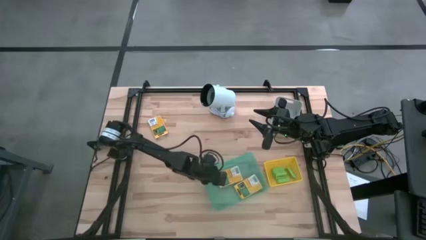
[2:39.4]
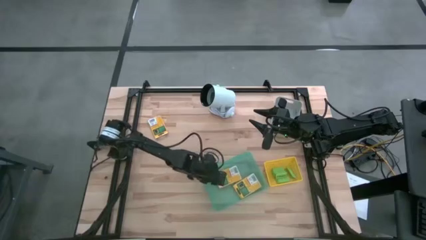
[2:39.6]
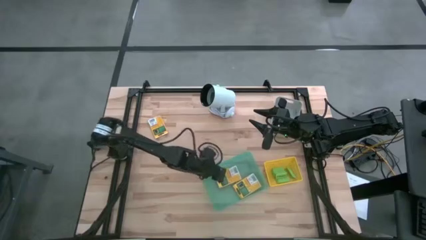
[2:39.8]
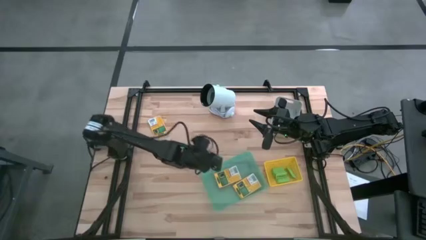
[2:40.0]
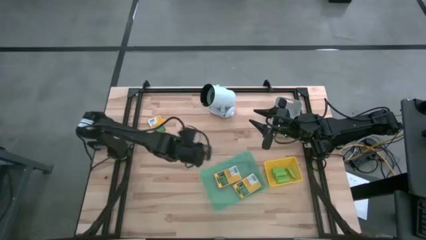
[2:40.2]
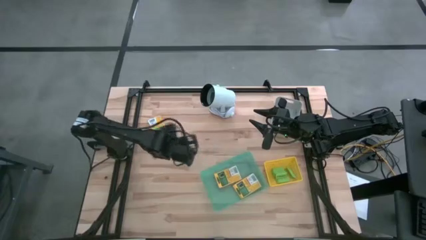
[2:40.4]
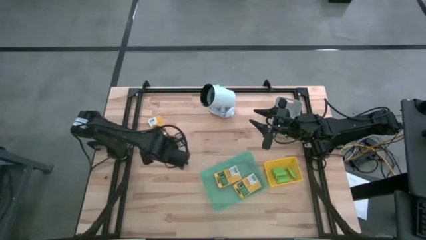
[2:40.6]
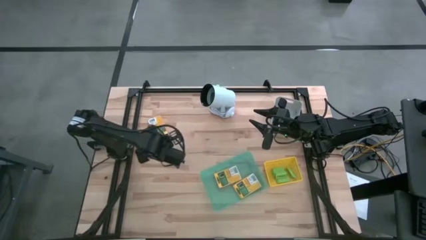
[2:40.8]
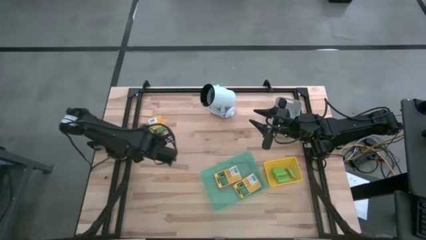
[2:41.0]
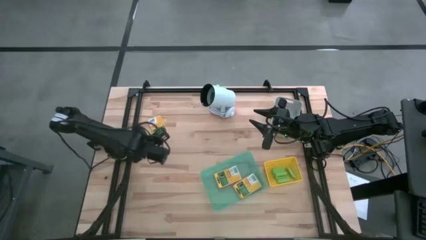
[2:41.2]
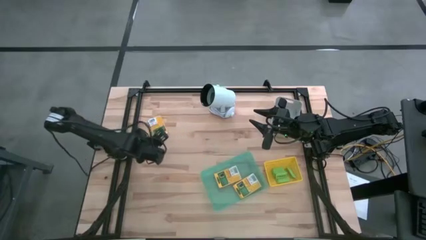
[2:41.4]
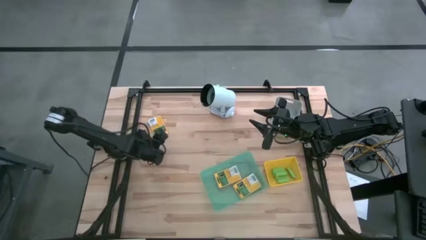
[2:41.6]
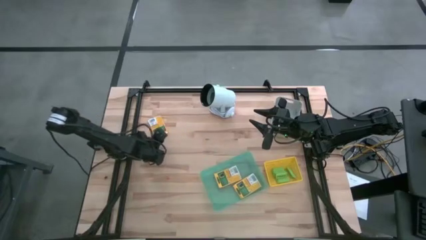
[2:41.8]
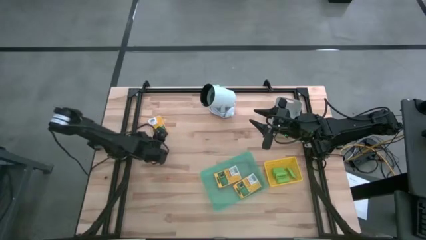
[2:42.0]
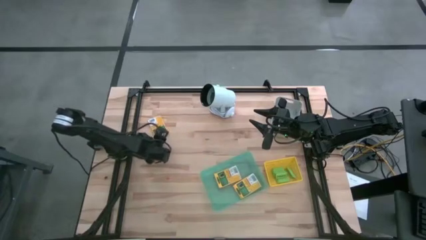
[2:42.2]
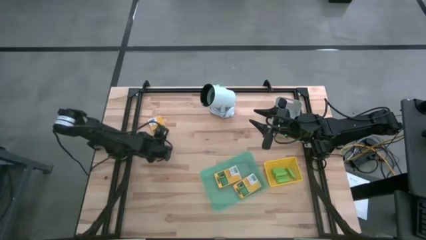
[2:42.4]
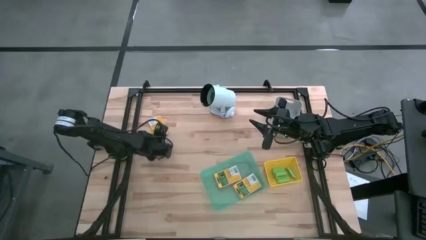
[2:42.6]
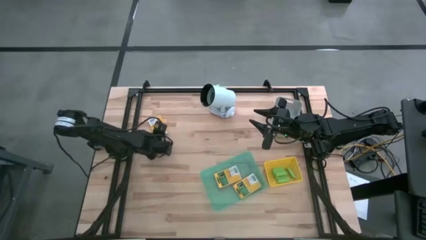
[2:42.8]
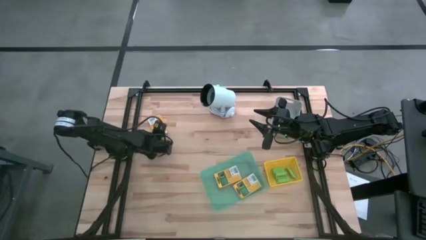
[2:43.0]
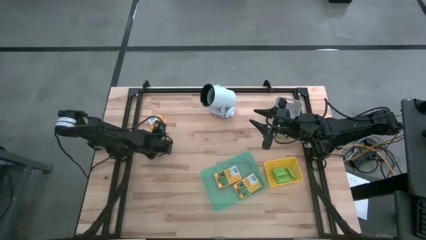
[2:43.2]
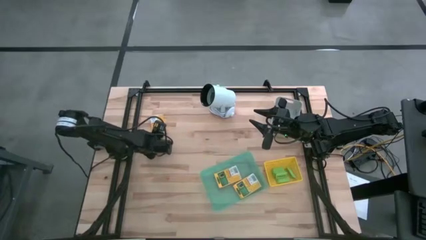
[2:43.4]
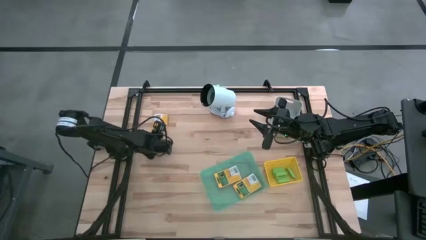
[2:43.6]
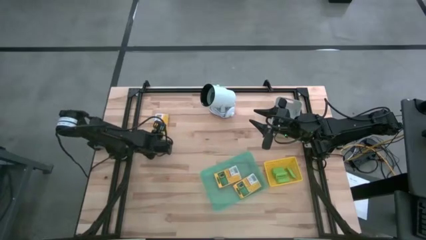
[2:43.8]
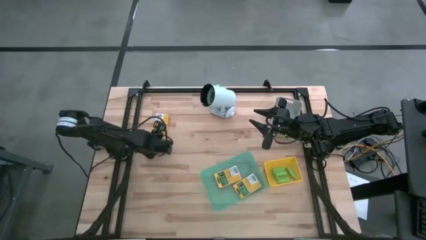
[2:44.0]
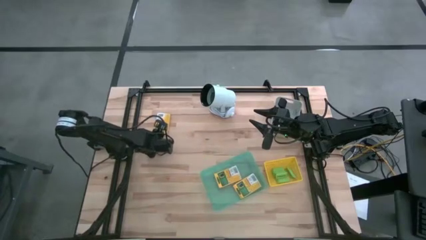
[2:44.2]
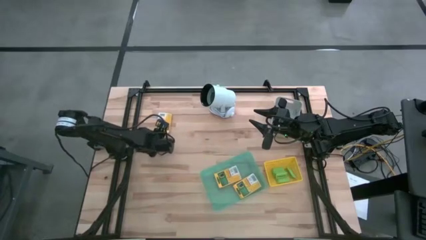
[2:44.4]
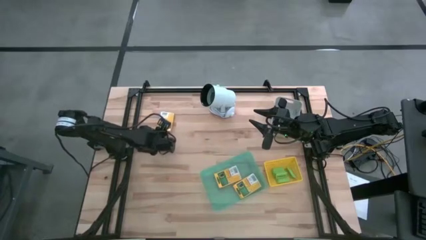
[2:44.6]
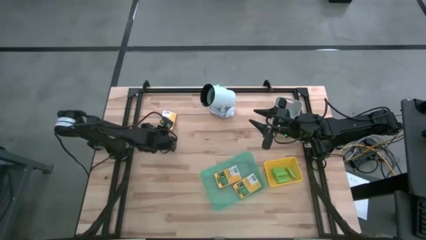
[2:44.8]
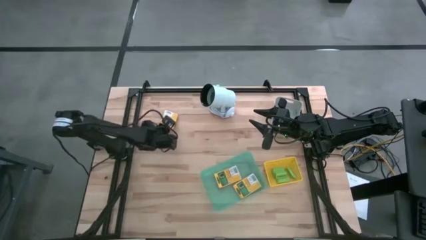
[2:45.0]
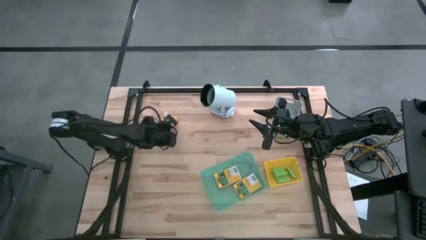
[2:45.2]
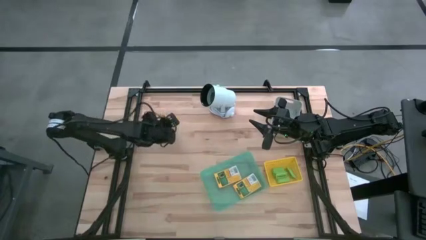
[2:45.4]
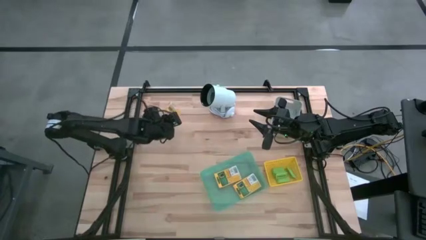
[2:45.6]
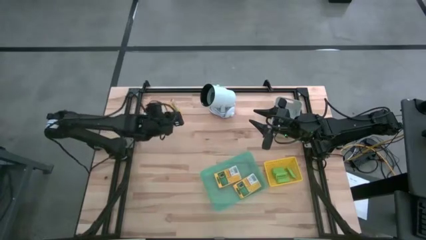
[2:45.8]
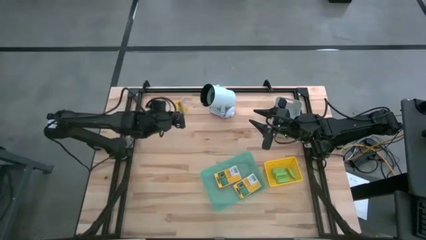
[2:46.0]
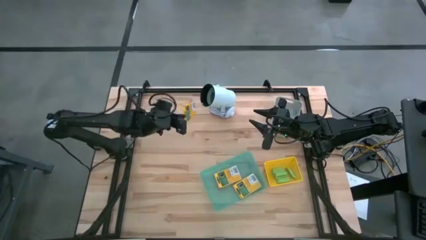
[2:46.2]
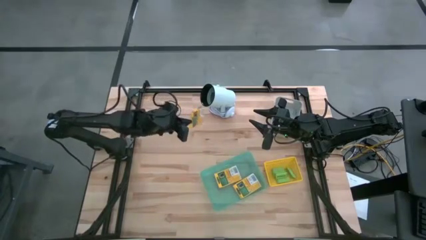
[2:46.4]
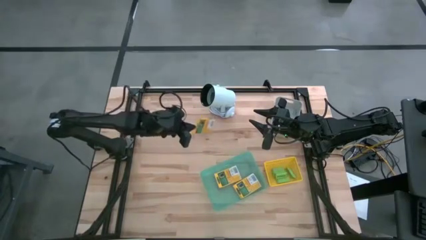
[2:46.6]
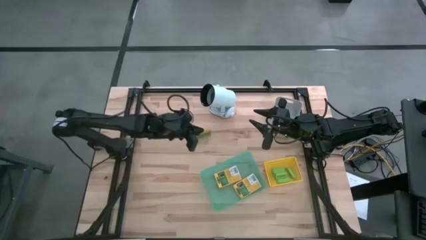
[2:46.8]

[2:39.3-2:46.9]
Task: Pick & Place School Supplies
Put the yellow crayon box into the green bin

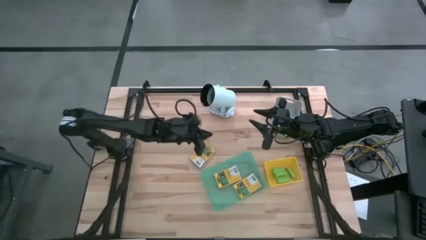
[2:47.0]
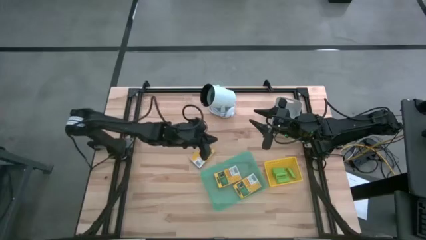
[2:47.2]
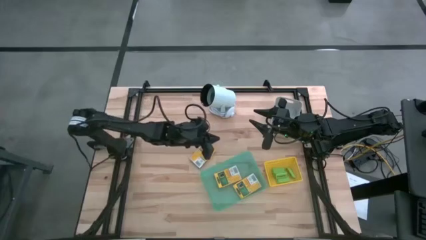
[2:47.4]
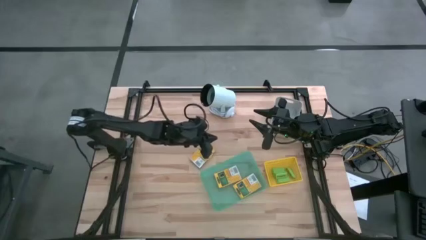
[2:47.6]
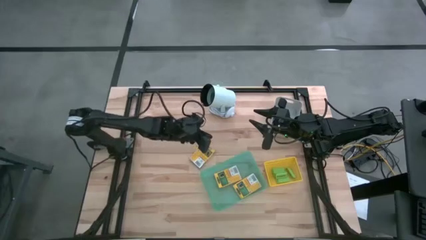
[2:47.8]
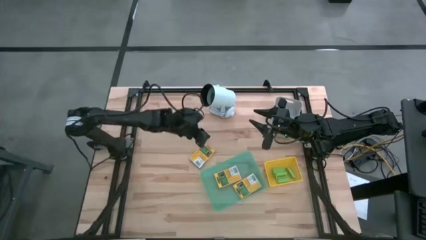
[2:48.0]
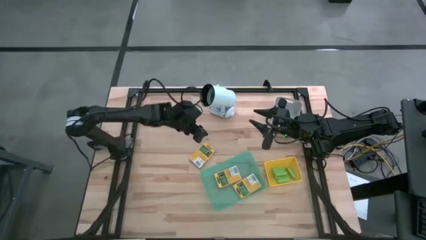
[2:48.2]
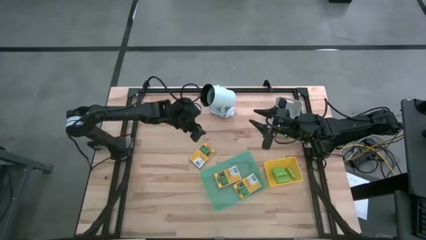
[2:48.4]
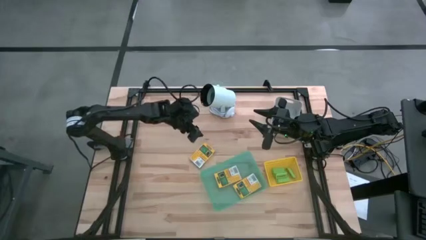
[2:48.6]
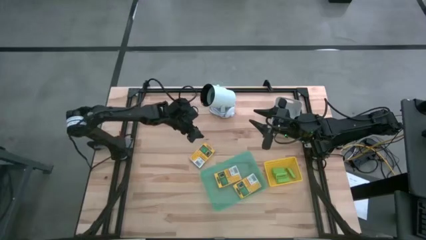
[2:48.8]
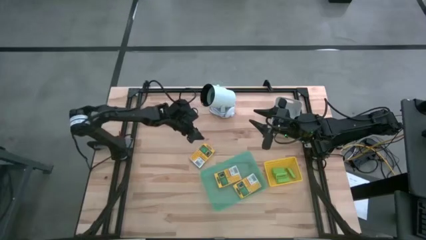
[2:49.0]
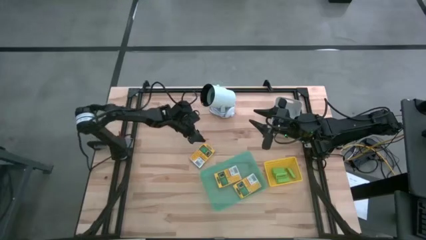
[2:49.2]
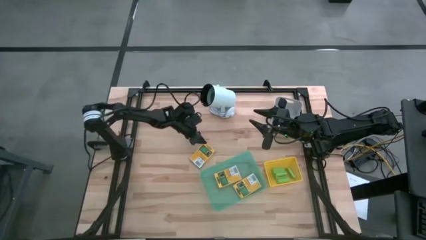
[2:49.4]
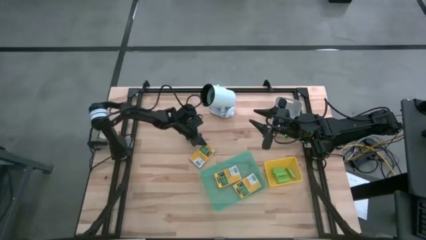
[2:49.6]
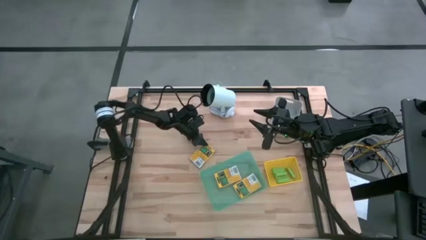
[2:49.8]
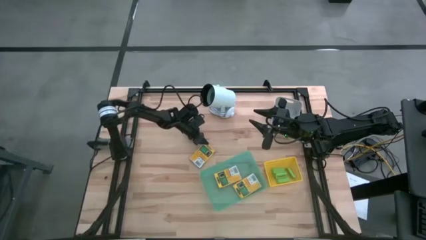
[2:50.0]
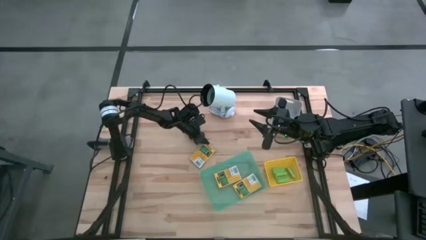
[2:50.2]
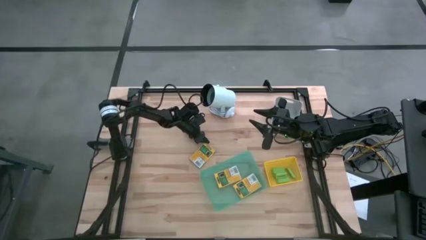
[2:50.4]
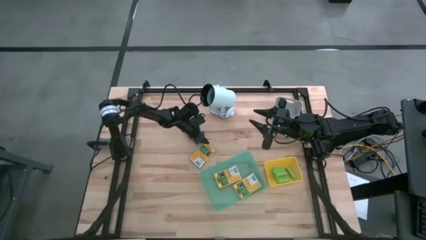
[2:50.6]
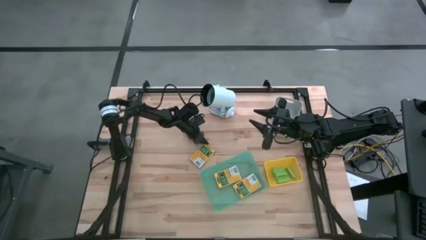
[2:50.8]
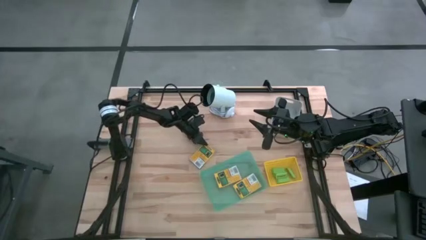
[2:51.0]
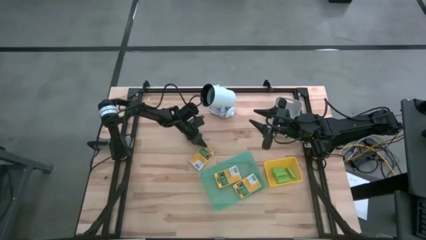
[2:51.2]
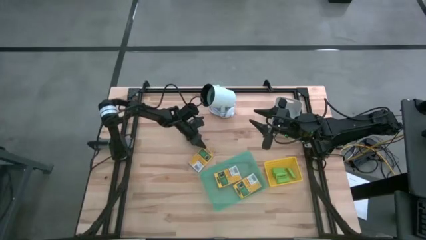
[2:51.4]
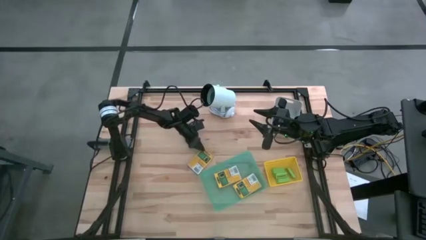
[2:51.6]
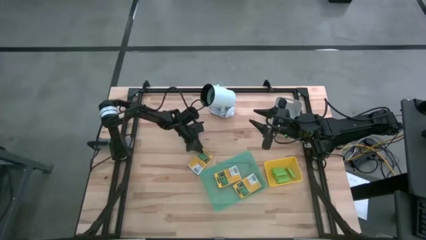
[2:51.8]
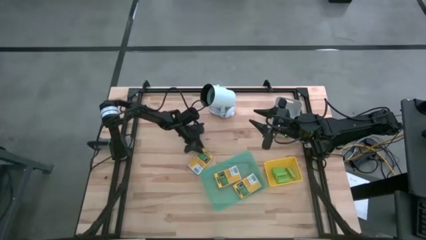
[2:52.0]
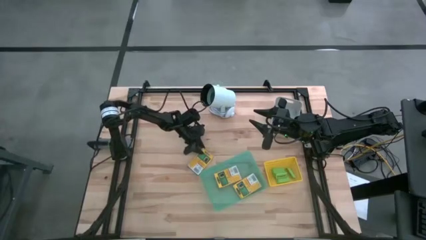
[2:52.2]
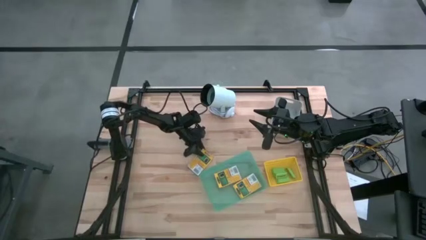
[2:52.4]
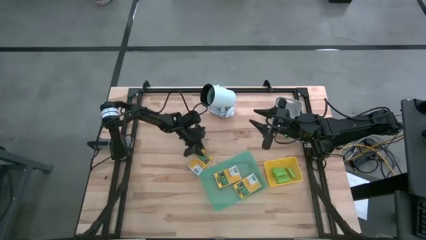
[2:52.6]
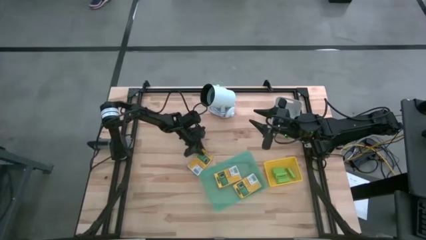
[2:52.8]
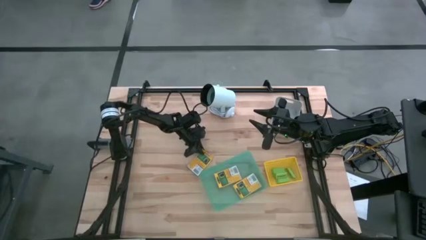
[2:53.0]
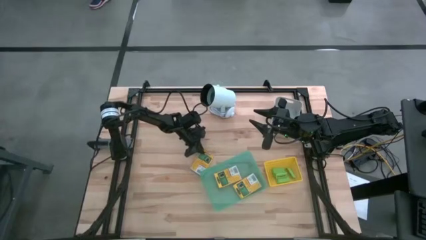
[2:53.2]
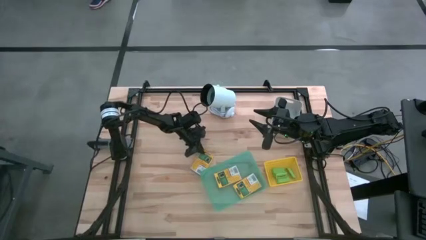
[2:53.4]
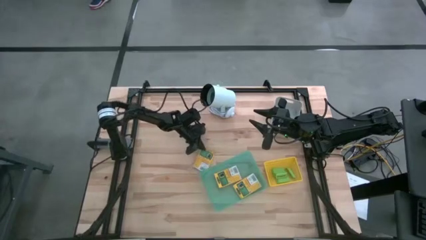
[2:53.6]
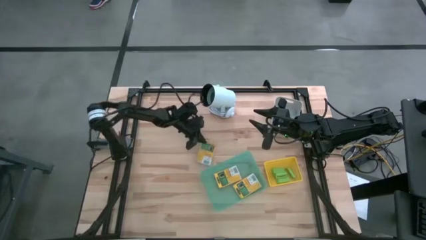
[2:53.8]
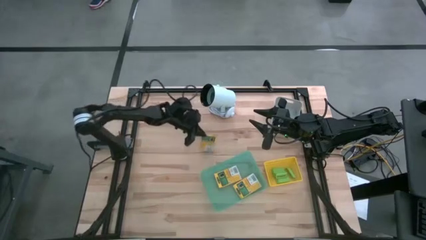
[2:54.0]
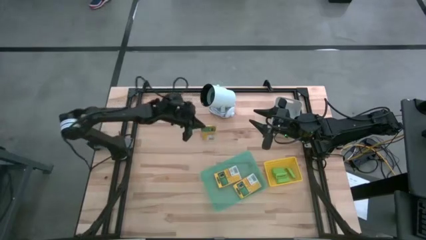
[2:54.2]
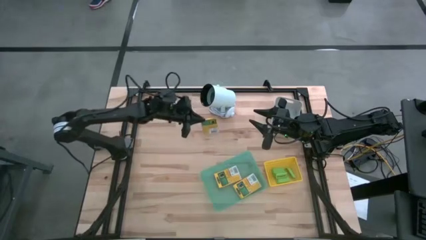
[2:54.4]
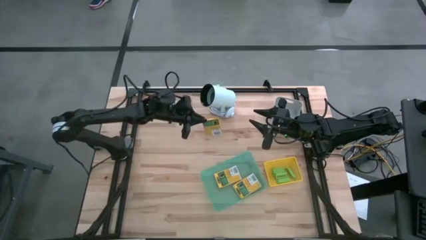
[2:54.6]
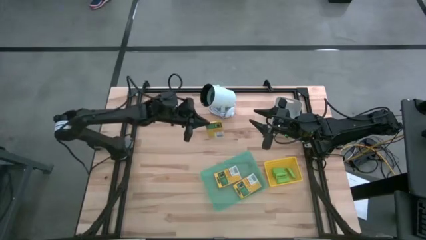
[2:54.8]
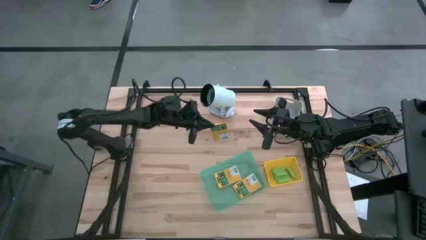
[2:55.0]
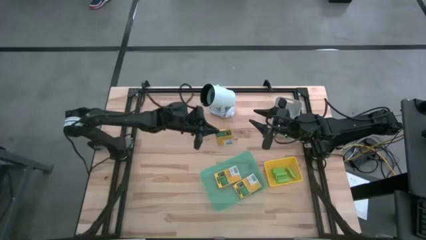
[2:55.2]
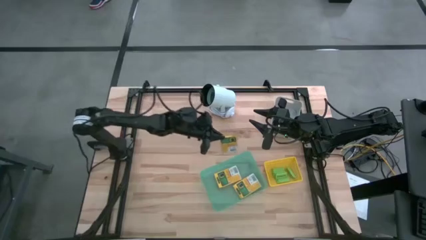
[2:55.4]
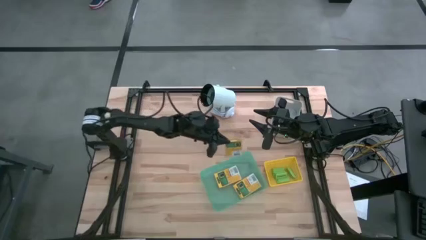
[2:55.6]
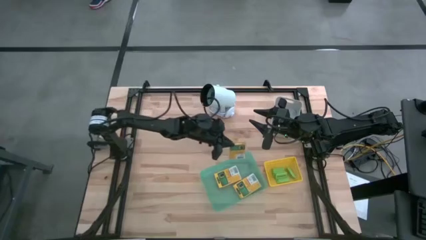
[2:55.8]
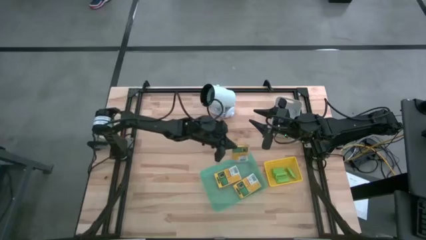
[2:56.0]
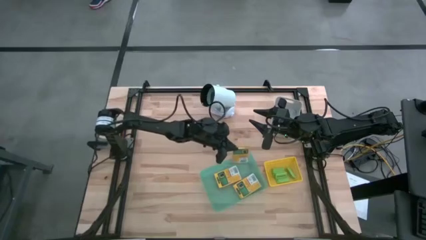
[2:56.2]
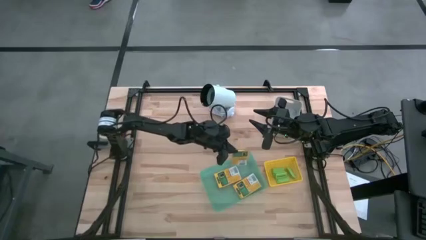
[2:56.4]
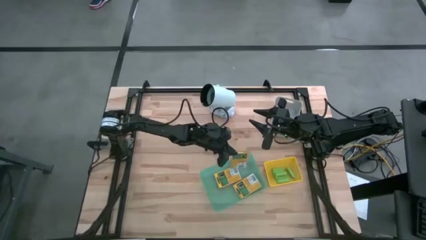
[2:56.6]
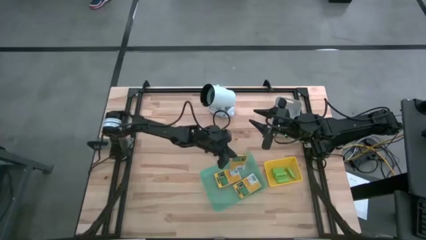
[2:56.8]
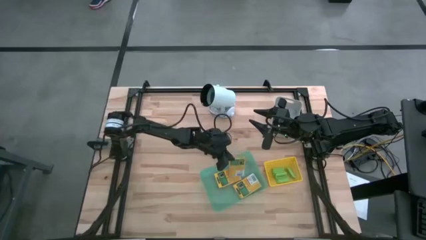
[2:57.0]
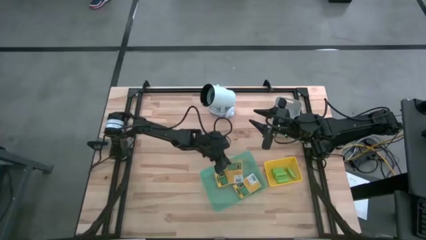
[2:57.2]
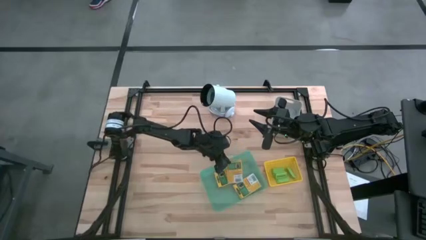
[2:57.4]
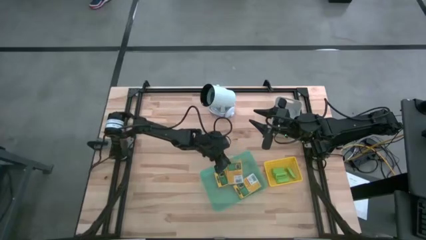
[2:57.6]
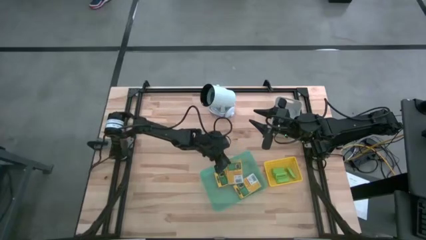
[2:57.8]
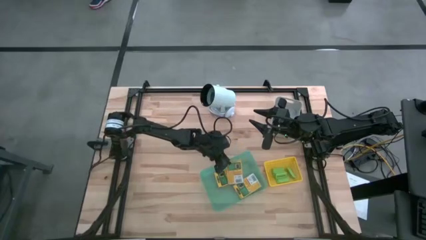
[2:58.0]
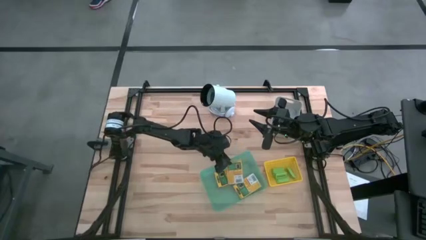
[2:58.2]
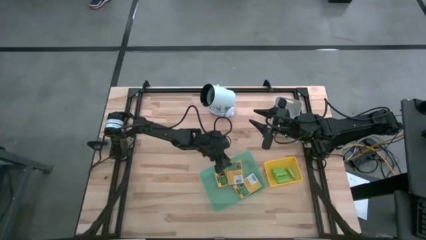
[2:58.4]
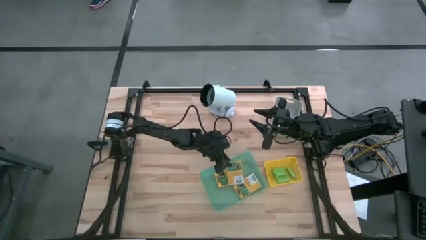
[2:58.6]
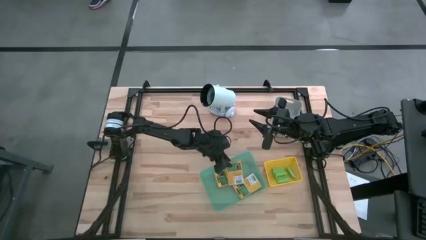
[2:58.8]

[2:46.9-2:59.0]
Put the yellow crayon box into the green bin
